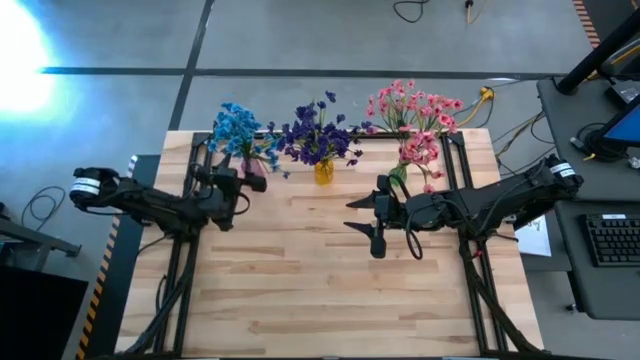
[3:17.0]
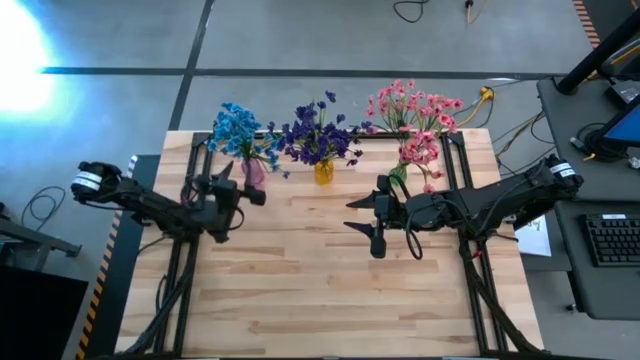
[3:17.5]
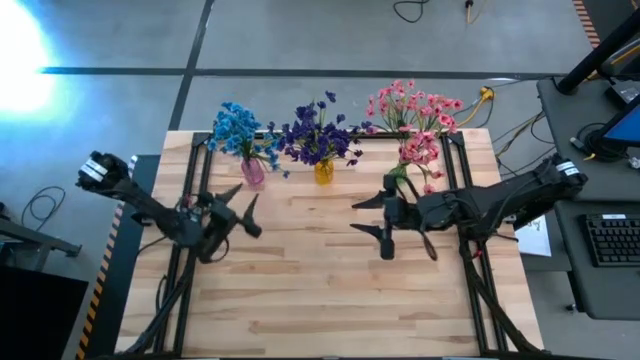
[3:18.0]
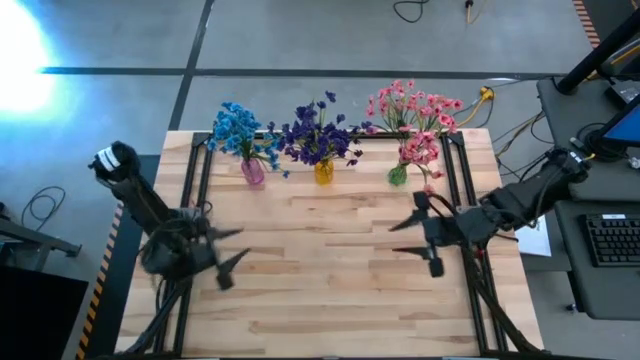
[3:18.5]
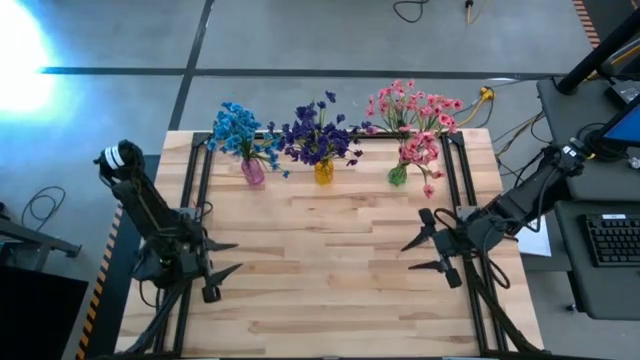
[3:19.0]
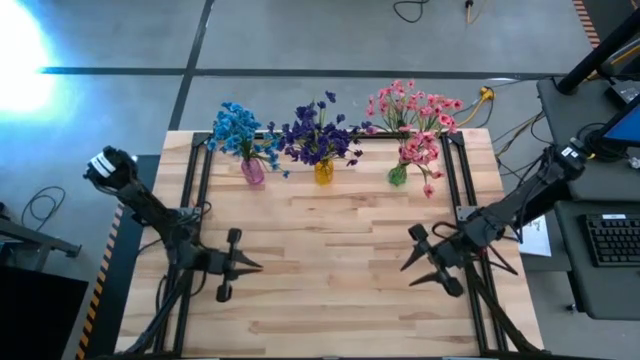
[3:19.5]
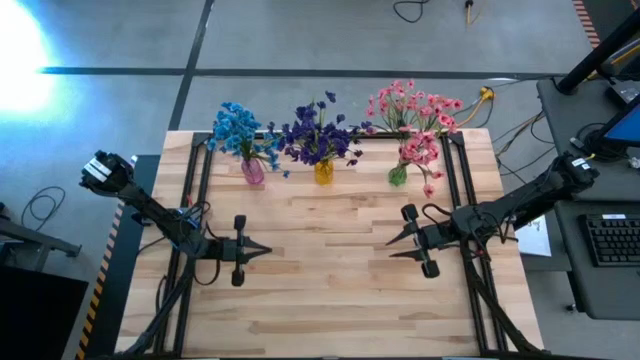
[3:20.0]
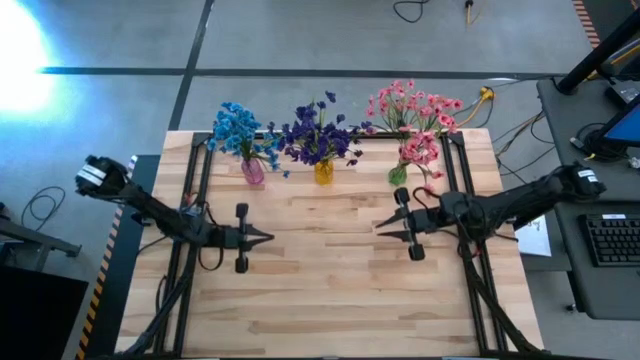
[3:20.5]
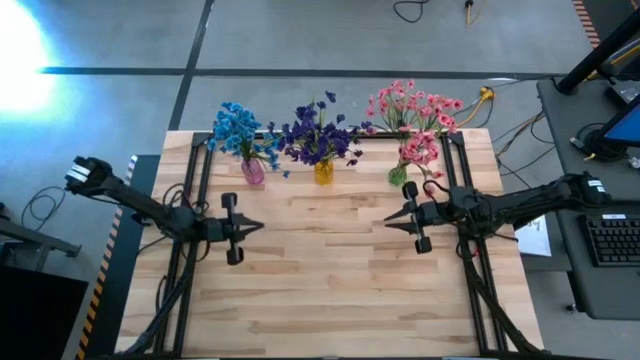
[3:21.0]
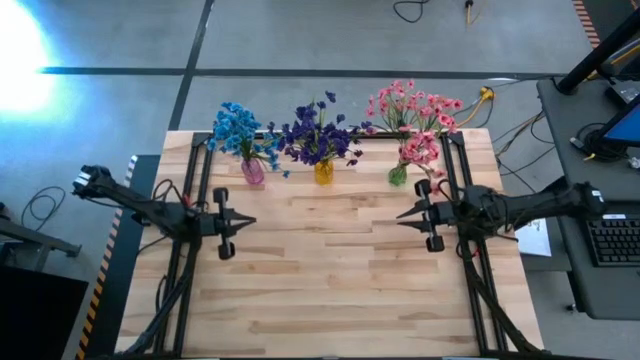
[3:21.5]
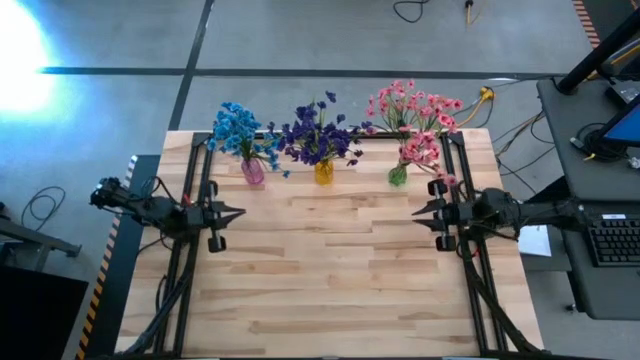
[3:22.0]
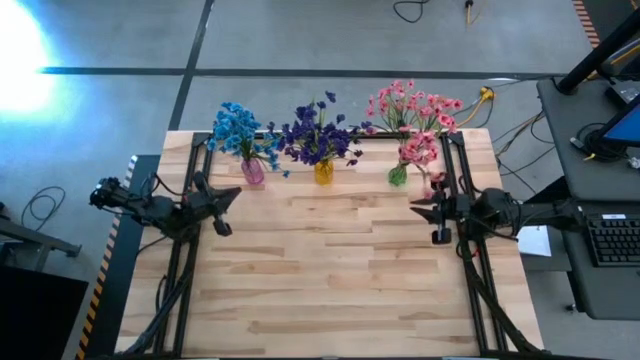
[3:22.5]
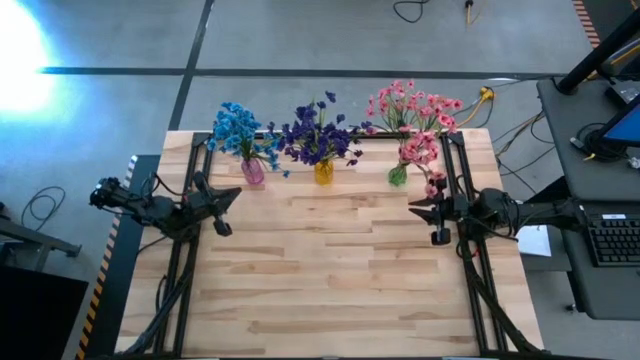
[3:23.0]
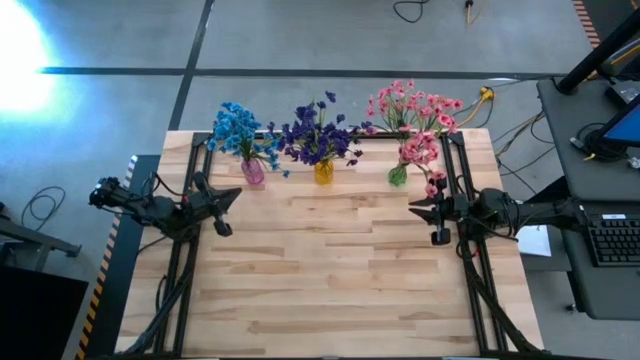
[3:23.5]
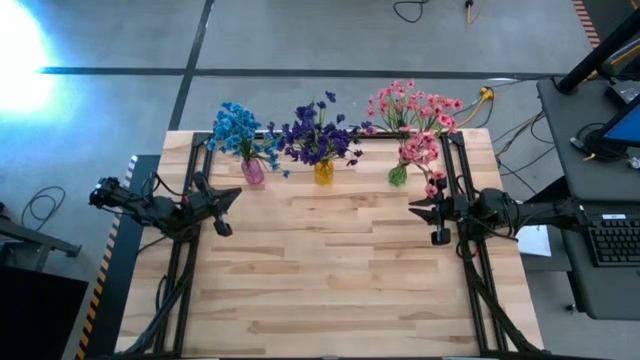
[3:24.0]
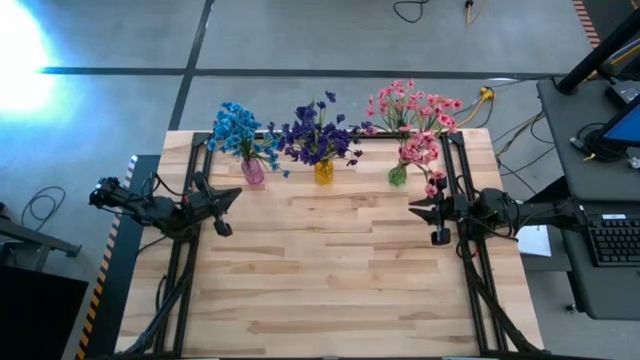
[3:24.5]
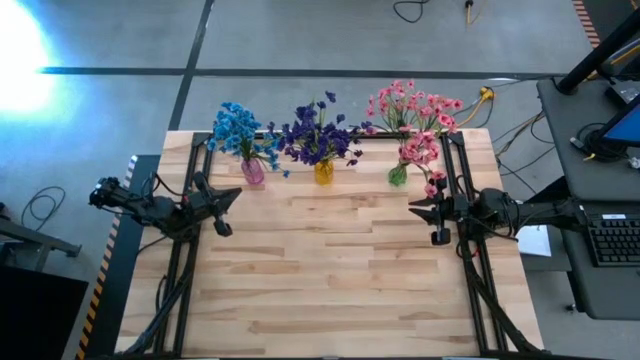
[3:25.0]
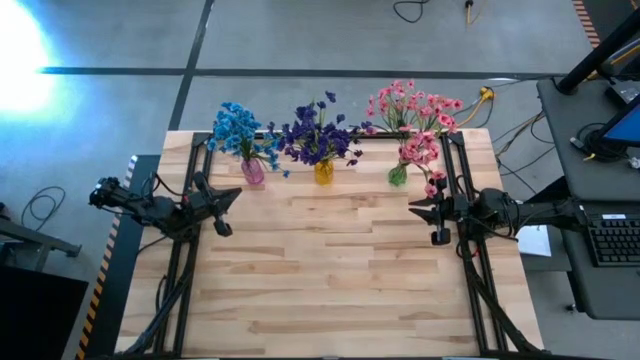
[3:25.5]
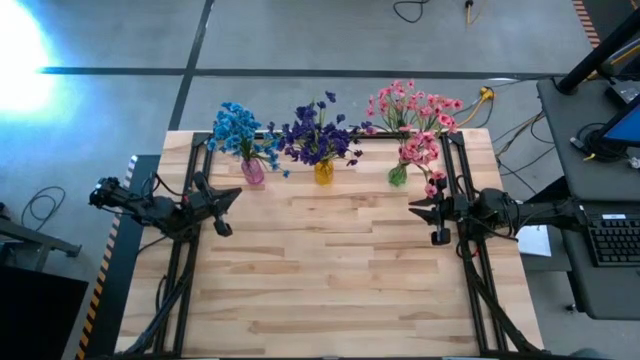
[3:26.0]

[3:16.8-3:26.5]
Task: Sort flowers into vase by color
Return to Home Position

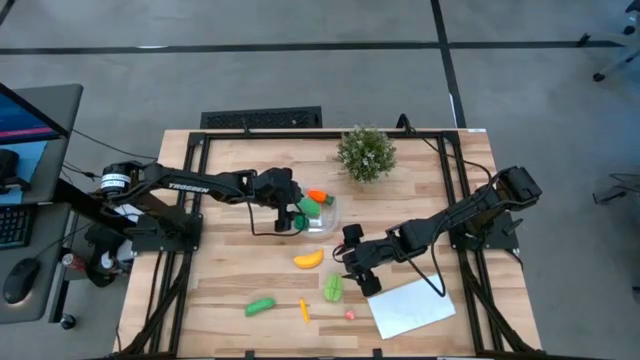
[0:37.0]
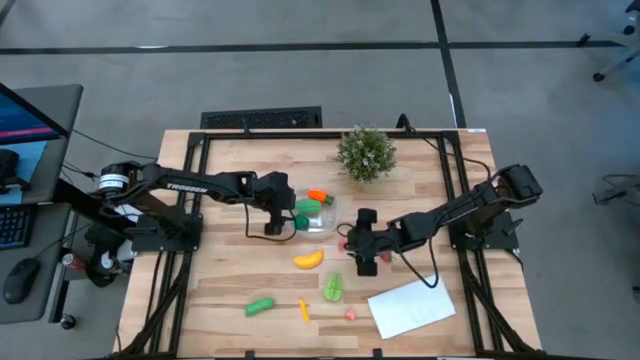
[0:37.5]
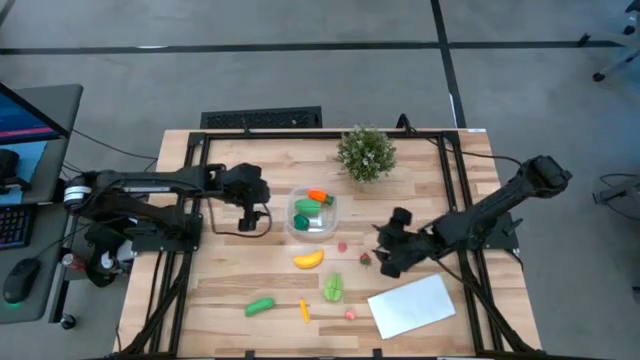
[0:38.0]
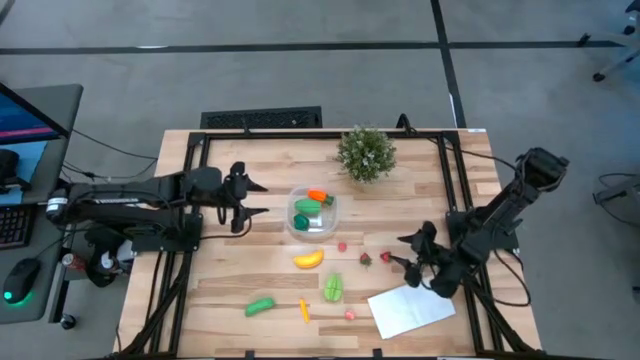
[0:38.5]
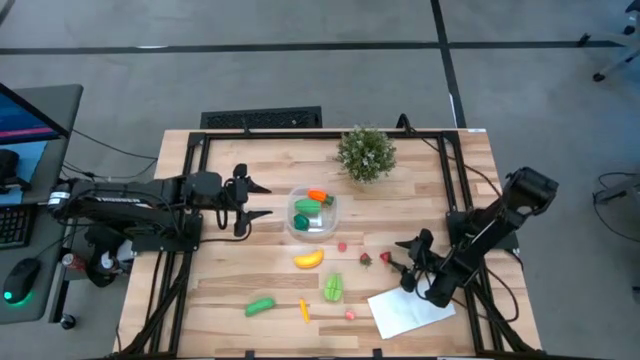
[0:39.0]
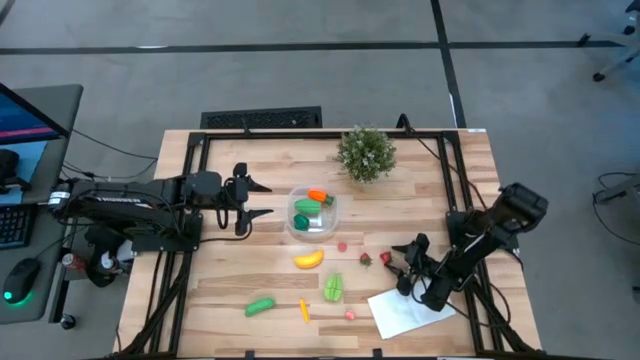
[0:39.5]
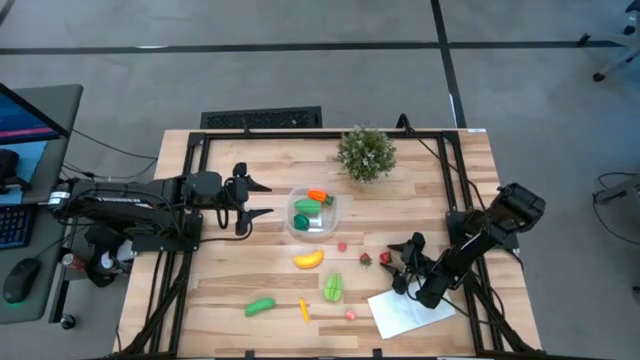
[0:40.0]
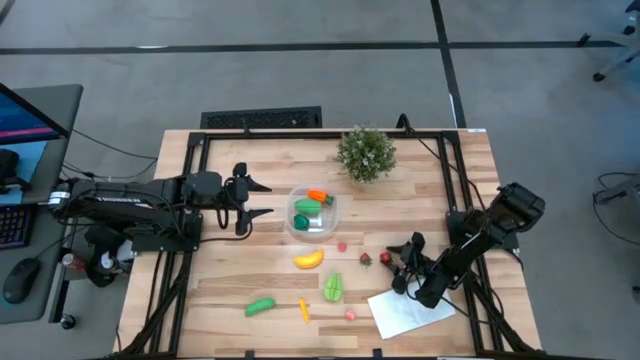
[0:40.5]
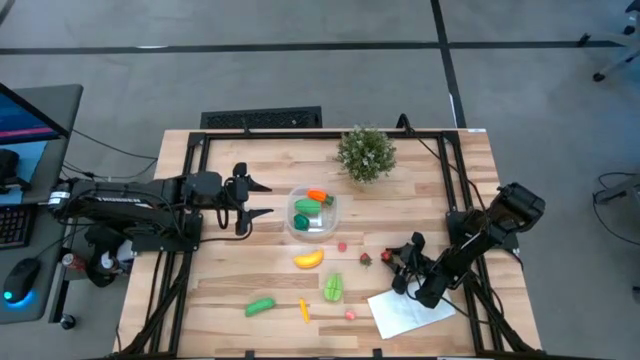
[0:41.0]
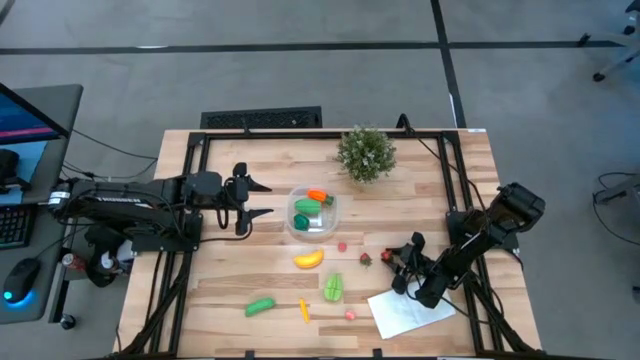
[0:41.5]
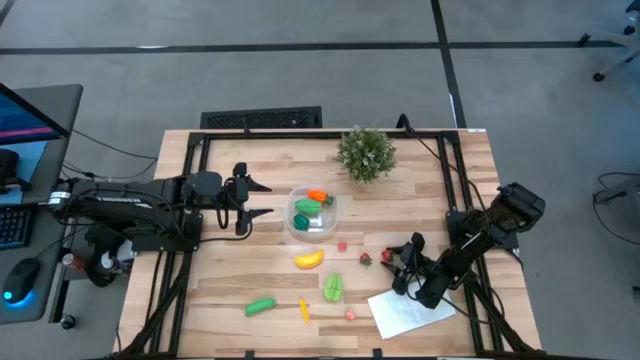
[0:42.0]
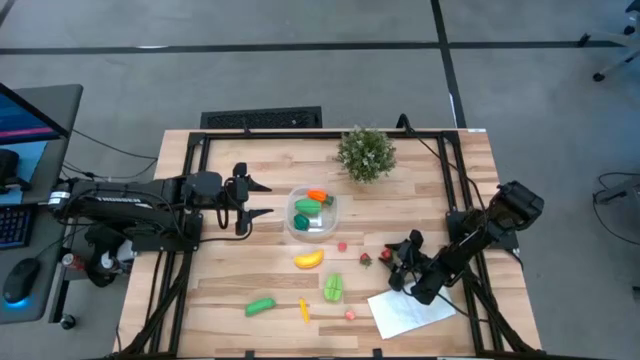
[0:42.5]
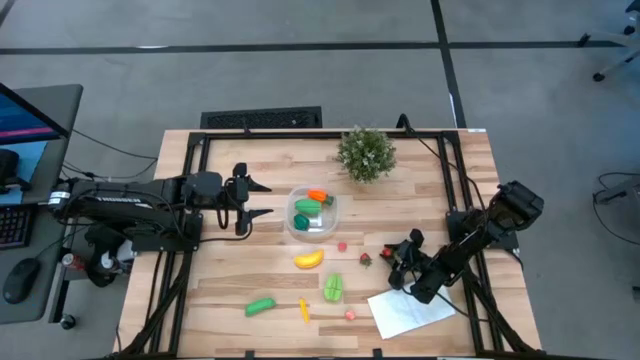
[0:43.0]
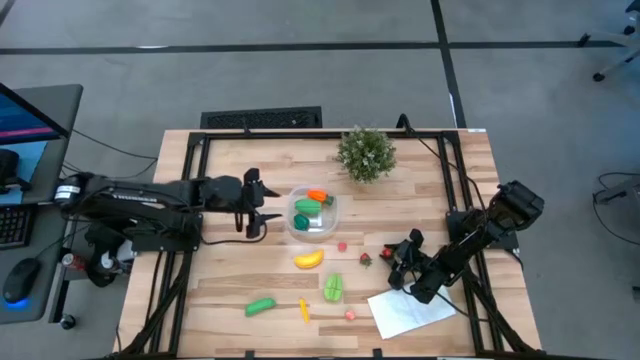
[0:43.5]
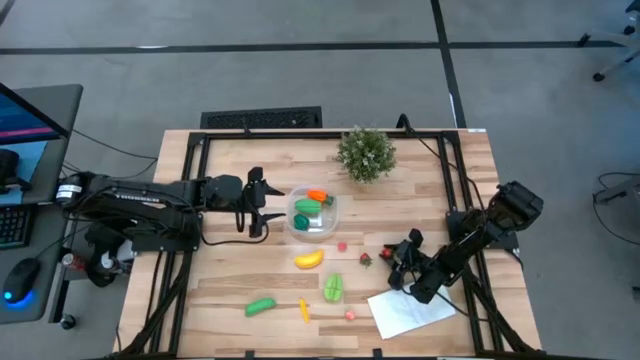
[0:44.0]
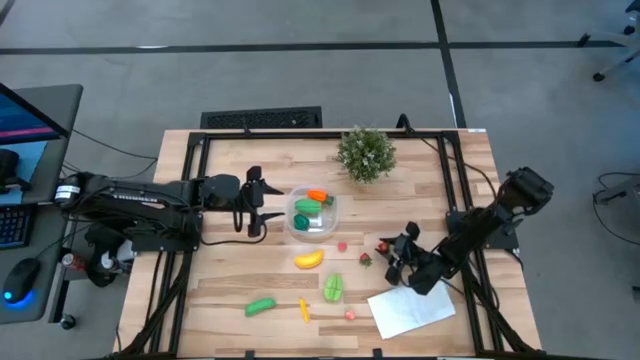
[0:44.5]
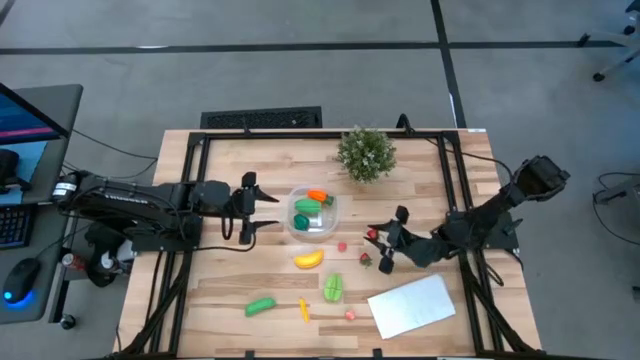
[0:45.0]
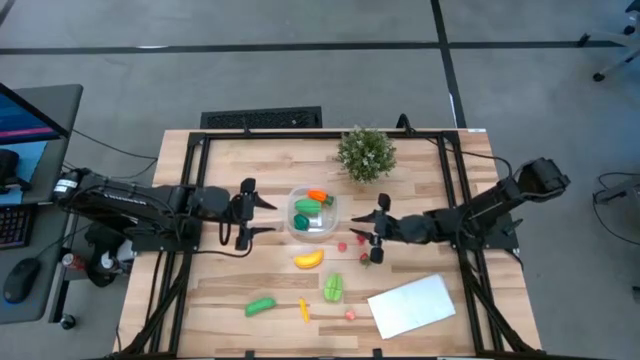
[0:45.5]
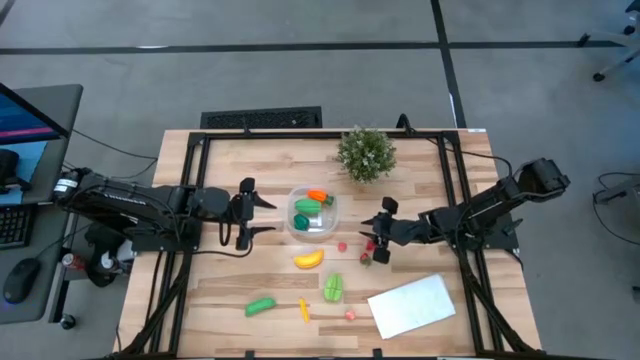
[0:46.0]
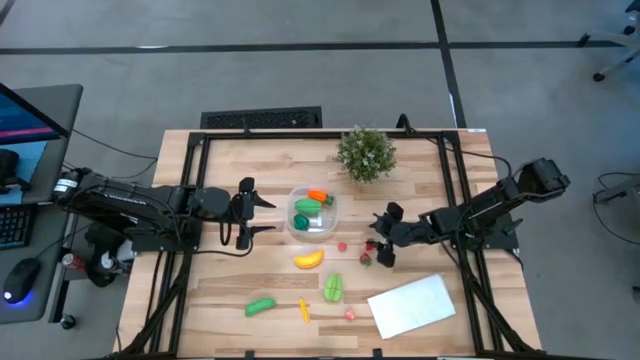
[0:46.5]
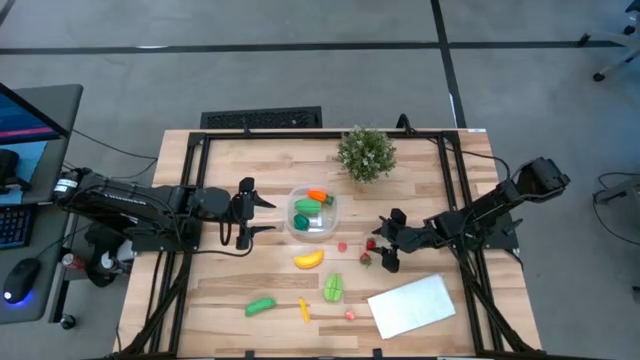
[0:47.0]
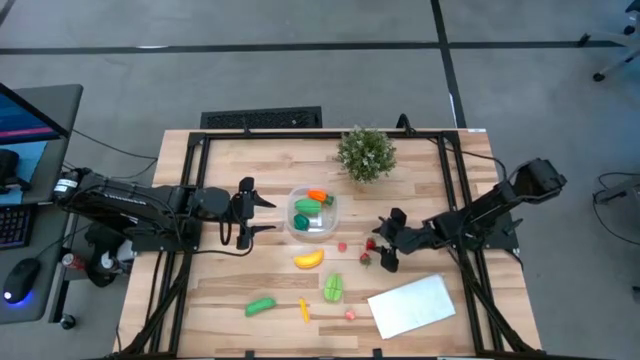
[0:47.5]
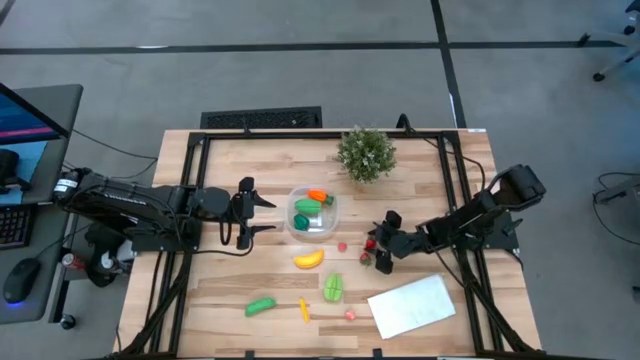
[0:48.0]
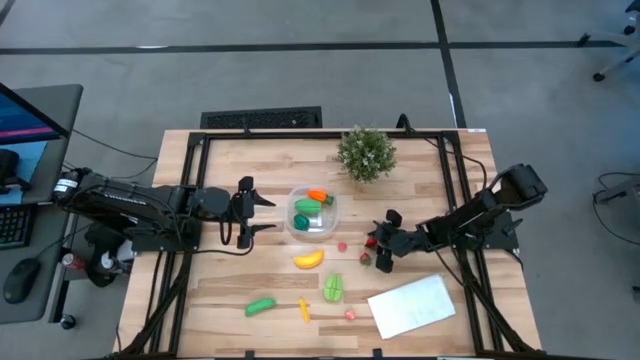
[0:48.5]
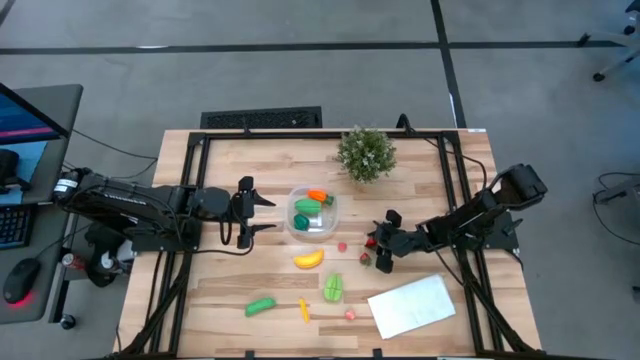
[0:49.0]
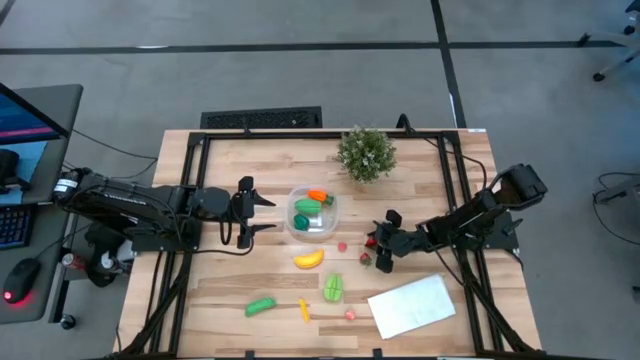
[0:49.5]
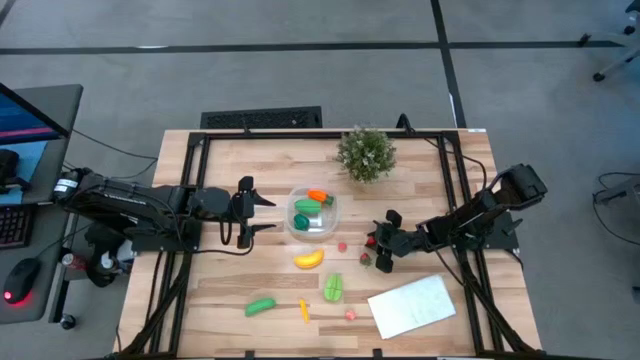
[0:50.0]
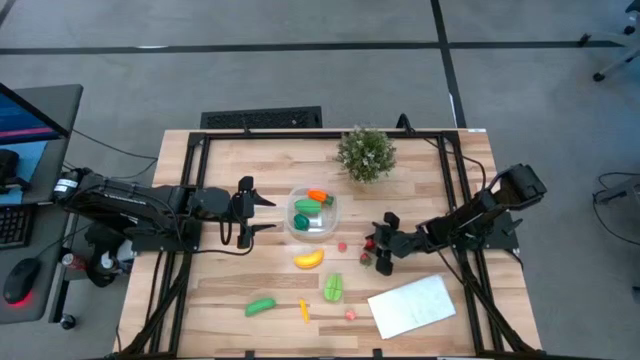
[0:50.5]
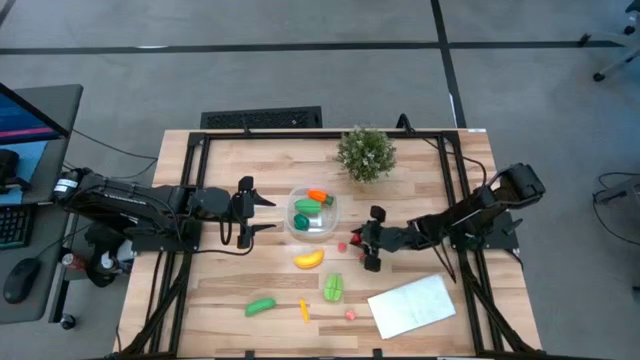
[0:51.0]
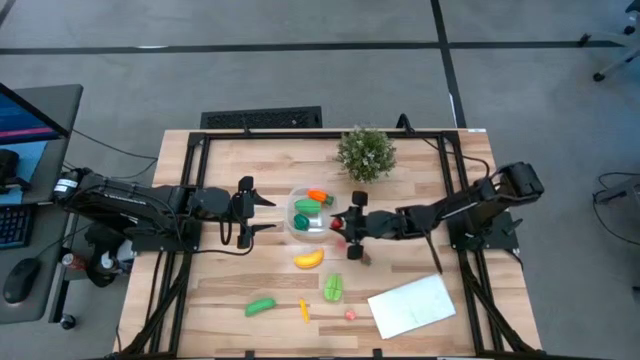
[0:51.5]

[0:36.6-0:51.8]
Task: Pick and placing Produce into tupperware
Put the right red strawberry into the transparent container
